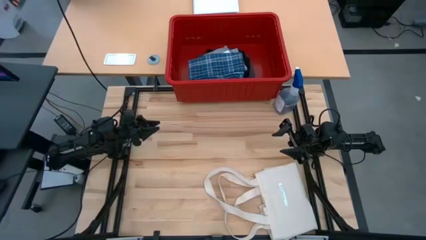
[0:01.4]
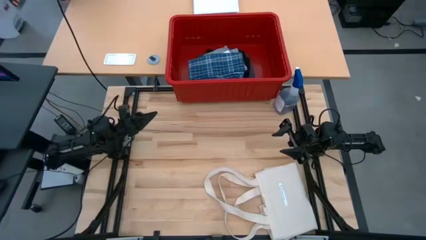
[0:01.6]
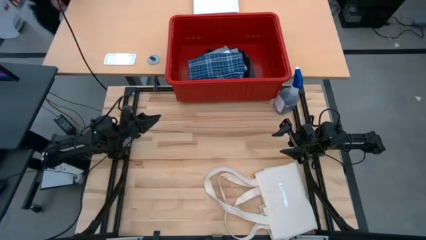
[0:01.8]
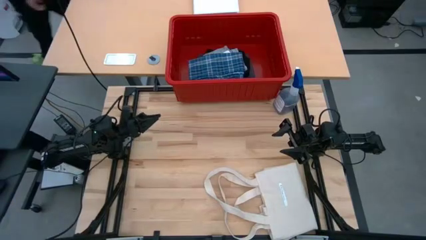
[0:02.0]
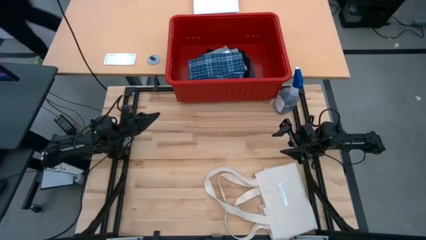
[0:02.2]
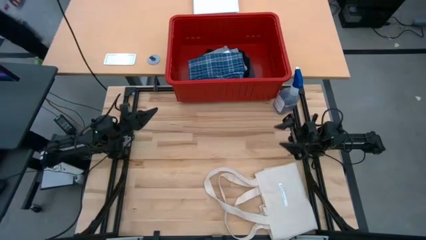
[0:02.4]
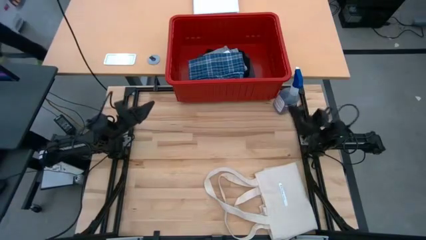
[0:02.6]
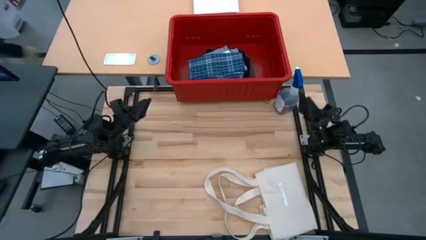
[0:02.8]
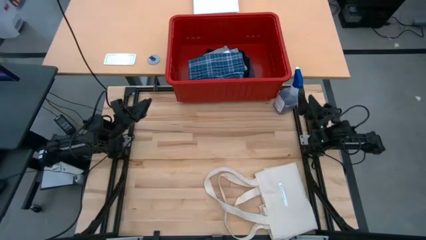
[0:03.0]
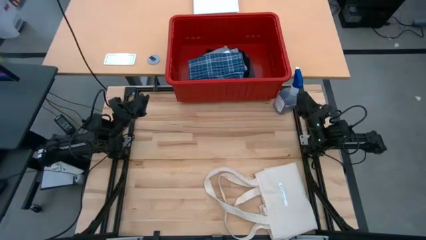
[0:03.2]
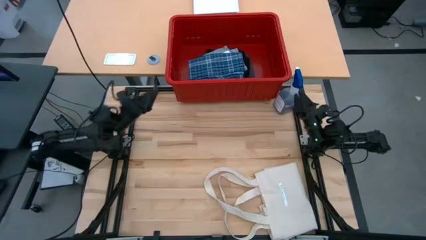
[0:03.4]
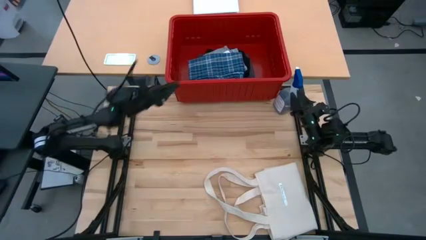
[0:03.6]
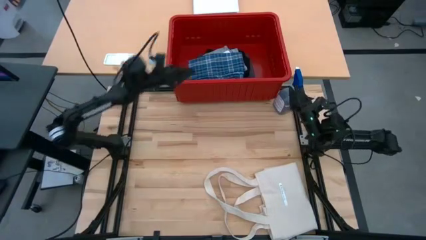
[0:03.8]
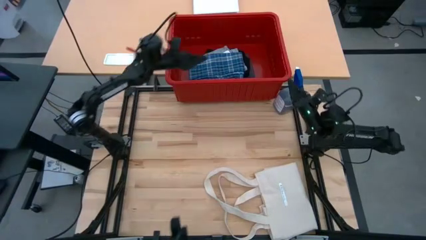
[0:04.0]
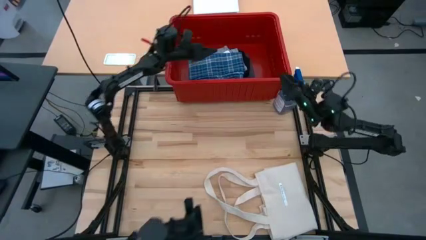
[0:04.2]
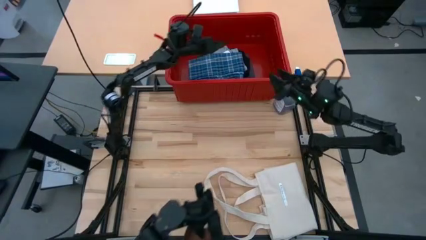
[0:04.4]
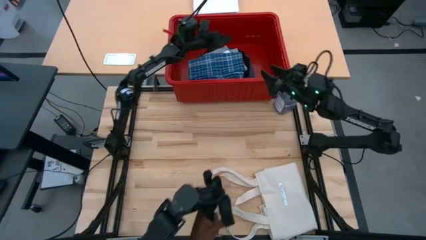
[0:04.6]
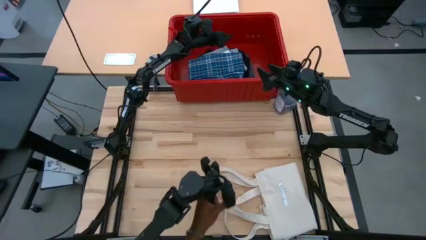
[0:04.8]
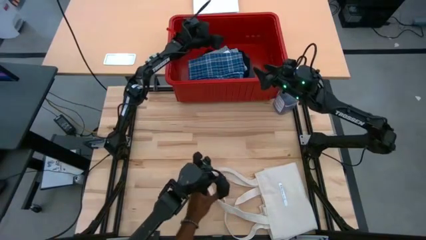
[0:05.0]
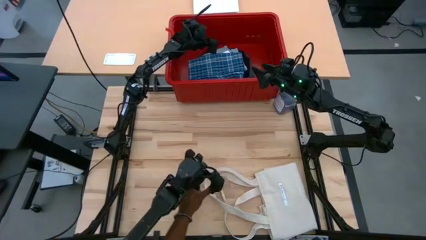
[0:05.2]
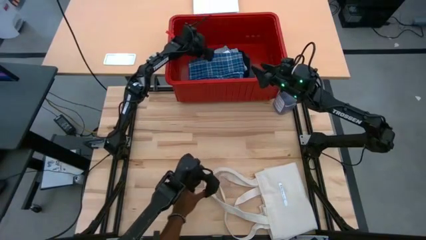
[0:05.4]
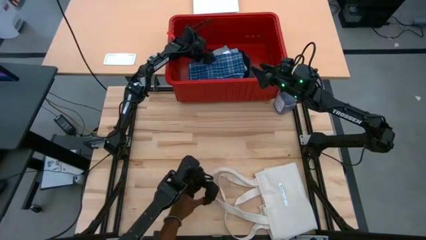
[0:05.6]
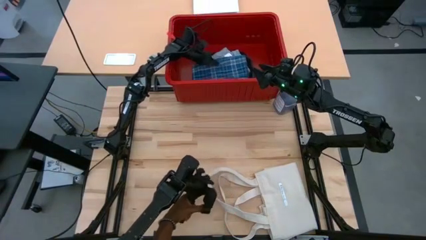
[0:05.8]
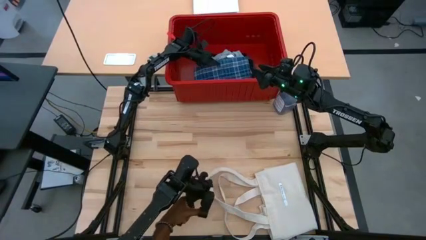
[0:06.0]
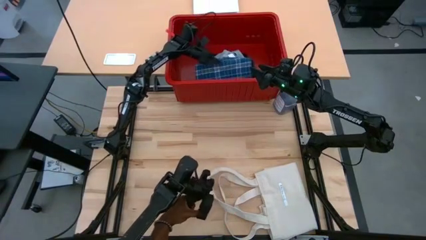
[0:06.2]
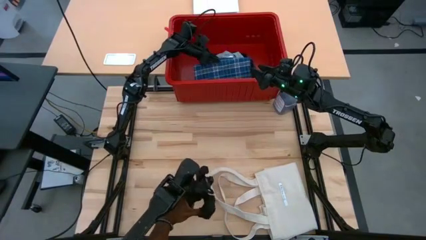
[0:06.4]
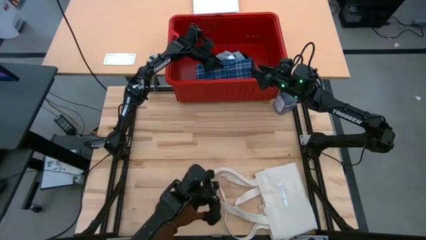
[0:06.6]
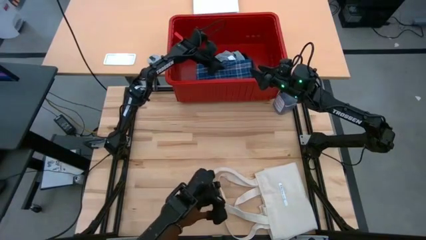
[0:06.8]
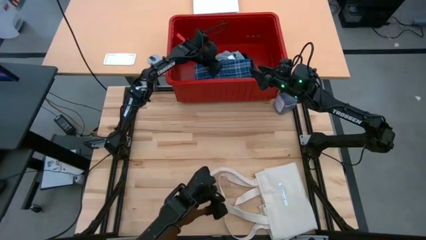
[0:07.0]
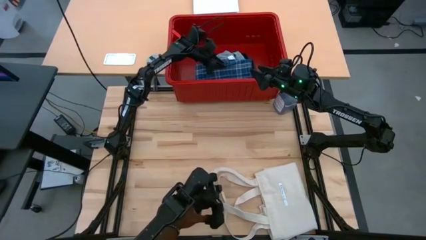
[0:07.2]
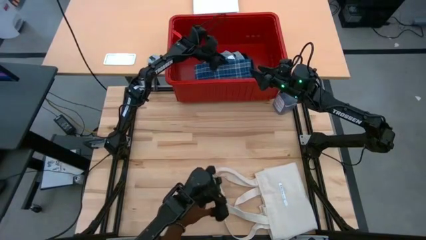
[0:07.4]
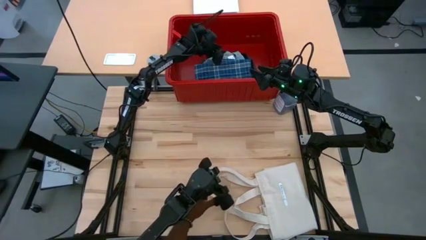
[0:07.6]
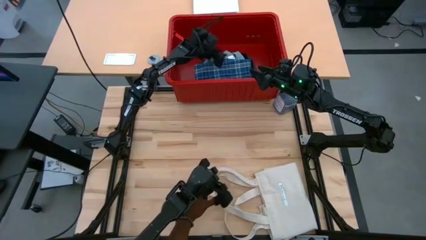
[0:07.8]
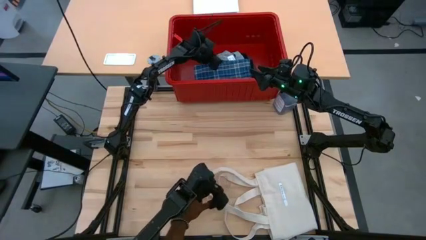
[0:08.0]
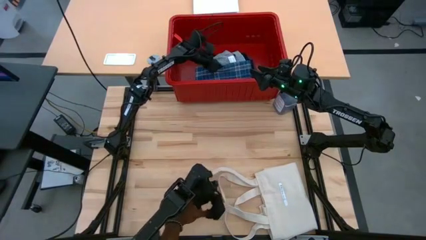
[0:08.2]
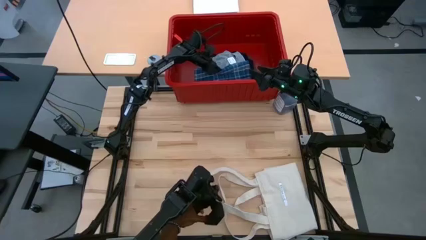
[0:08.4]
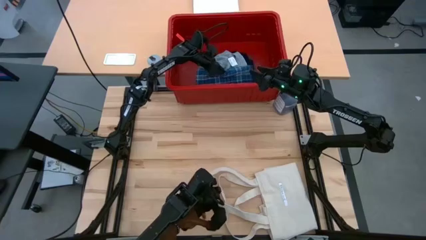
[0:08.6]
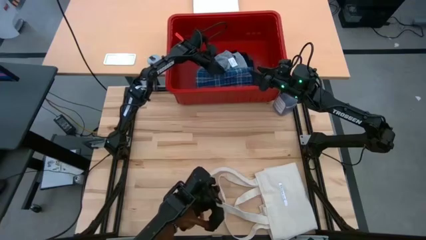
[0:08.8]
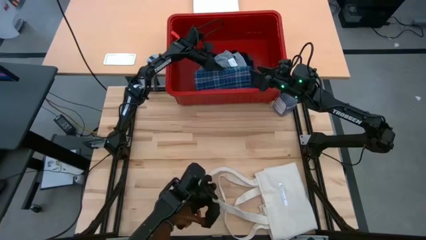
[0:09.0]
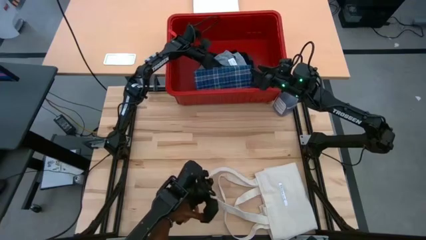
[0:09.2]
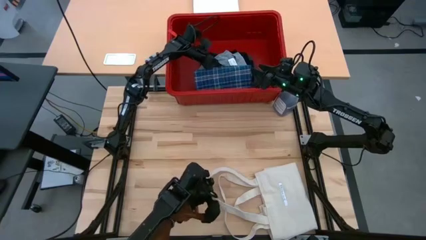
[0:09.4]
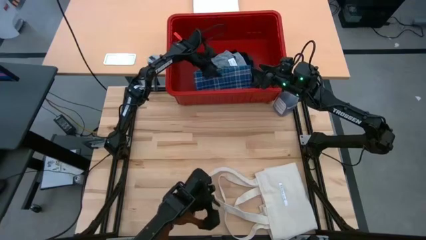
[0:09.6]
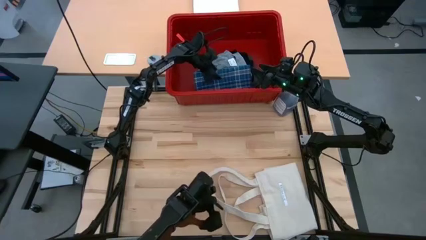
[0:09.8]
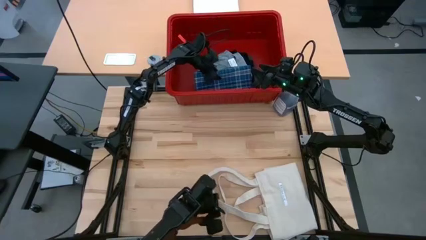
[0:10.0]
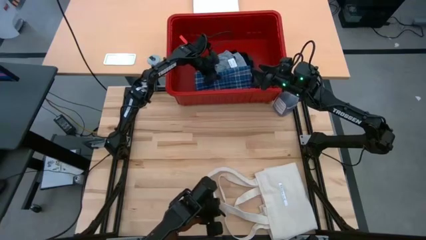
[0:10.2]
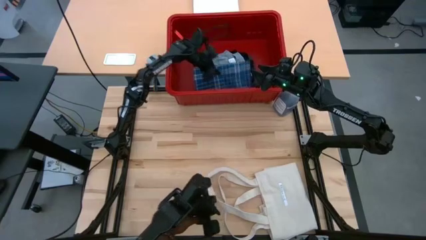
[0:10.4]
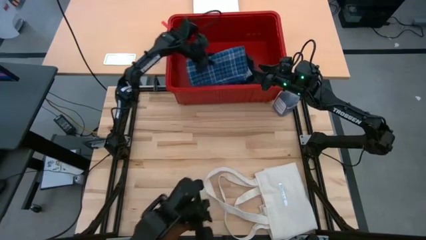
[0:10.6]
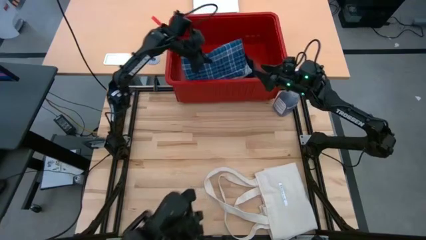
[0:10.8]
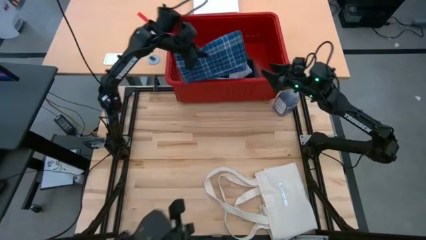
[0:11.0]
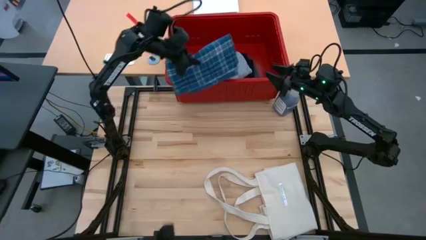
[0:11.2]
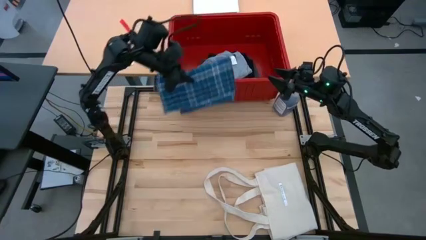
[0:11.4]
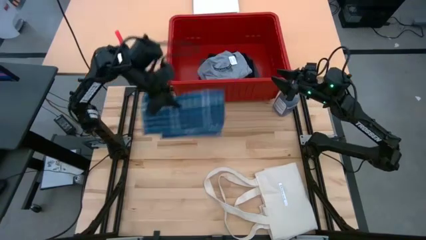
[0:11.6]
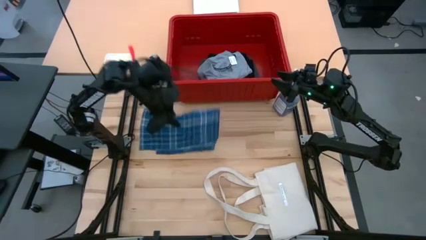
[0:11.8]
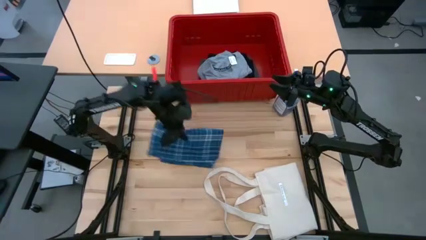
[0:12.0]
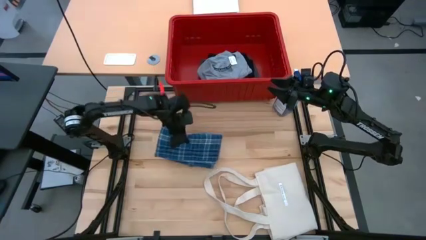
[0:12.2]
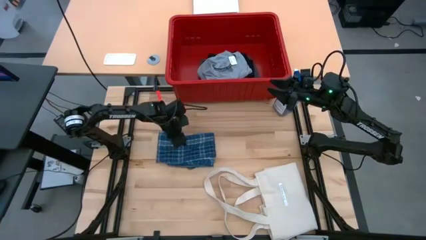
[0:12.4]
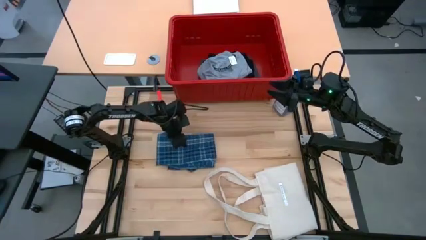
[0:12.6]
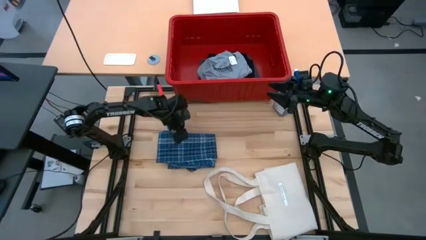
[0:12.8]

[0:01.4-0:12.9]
Task: Fold laundry
Remove the blue polo shirt from the red organizer bin

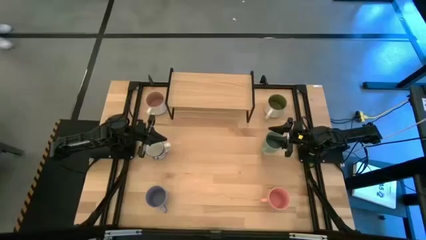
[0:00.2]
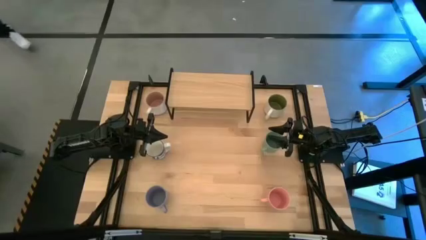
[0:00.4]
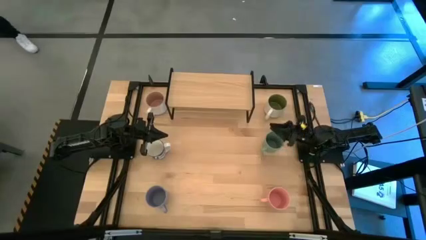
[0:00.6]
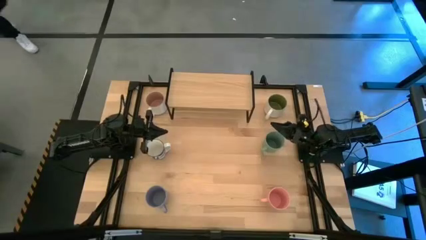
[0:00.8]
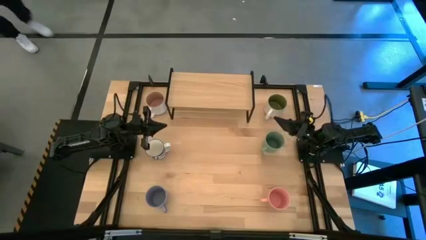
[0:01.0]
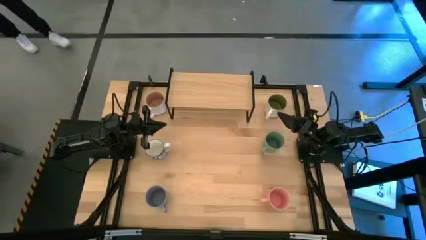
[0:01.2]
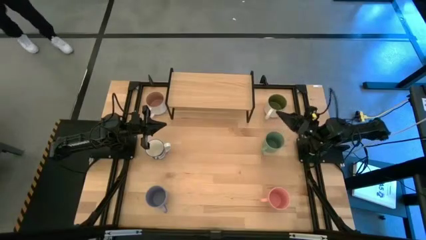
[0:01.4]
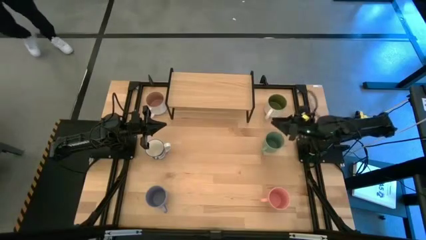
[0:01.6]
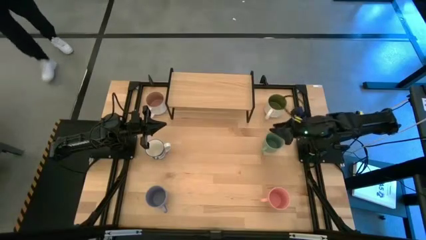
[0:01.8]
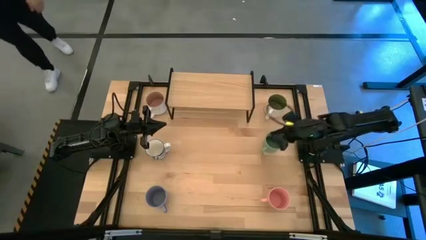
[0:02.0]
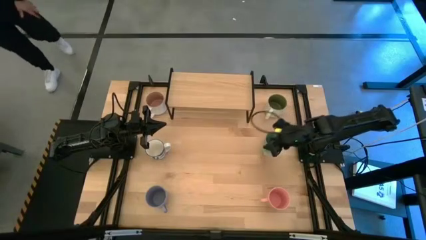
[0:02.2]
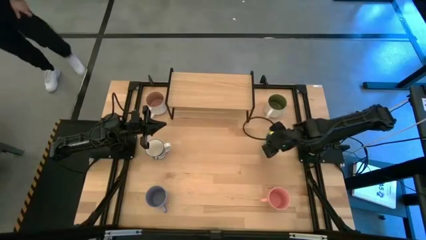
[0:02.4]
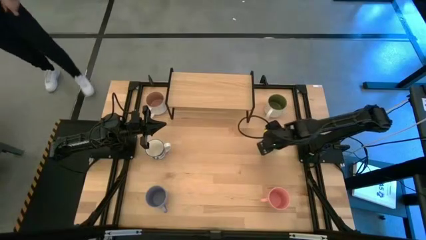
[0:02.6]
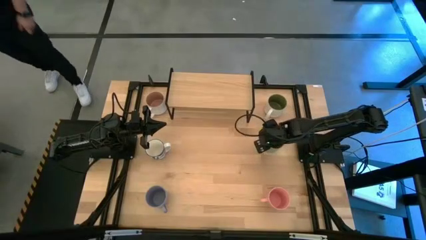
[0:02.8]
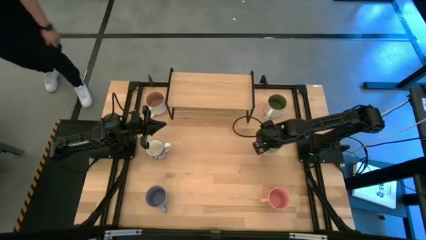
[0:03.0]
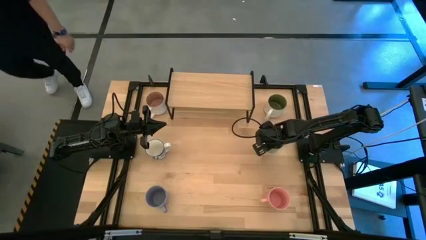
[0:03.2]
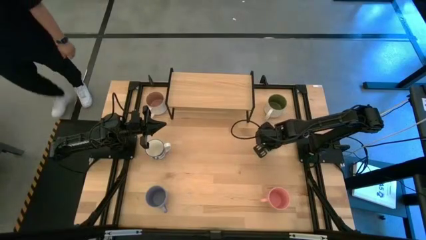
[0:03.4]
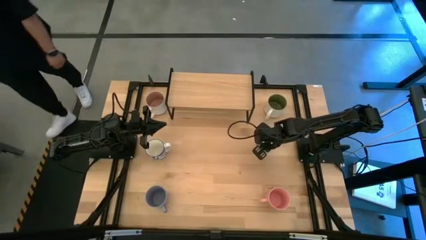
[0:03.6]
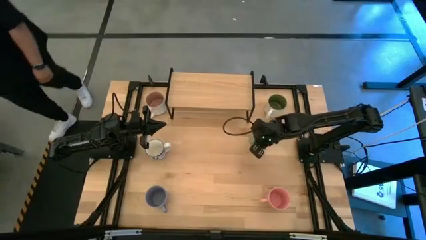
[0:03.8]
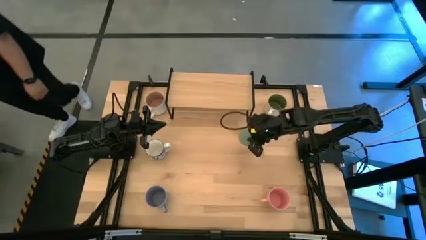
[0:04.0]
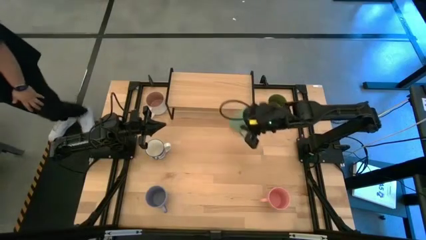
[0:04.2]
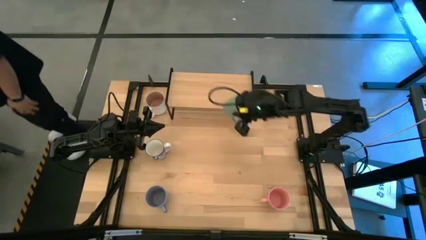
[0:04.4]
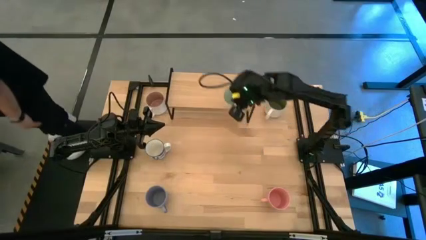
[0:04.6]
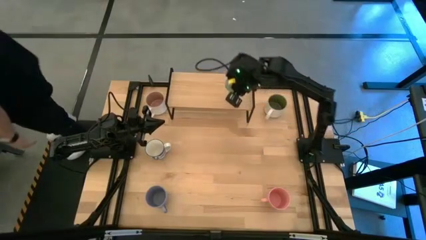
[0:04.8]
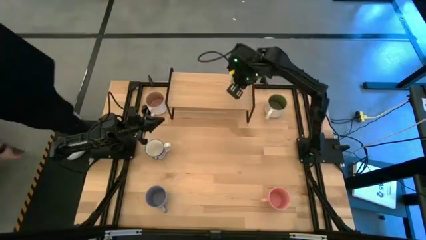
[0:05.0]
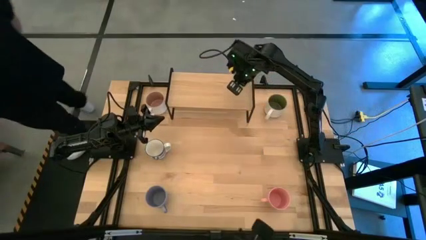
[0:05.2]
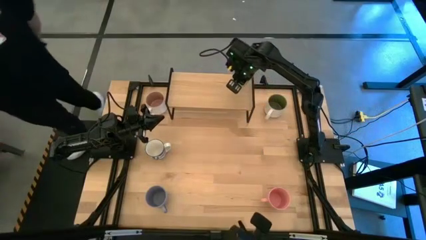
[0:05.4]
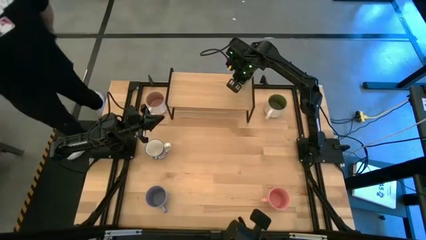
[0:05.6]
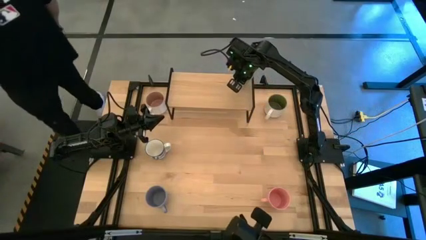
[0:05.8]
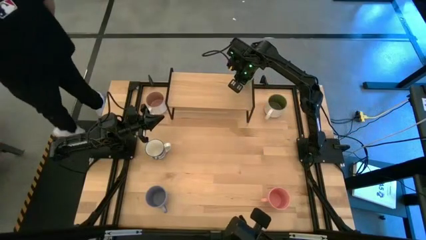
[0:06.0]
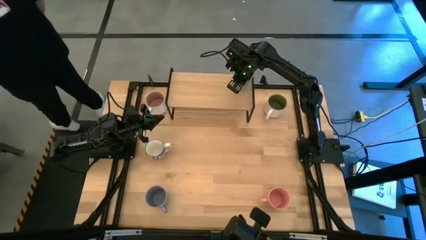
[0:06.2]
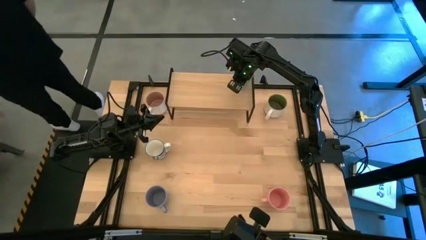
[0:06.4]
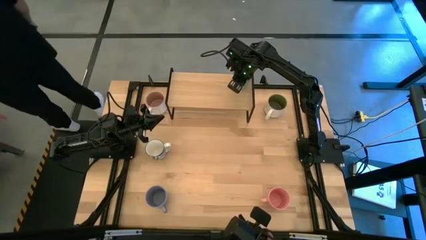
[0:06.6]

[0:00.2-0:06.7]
Task: Place coffee mugs
Put the green mug on the shelf
